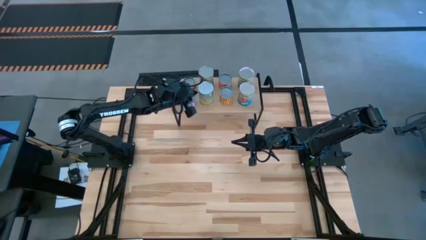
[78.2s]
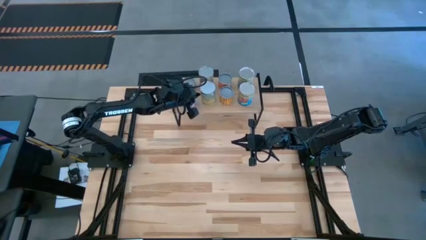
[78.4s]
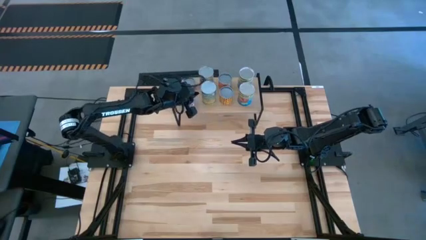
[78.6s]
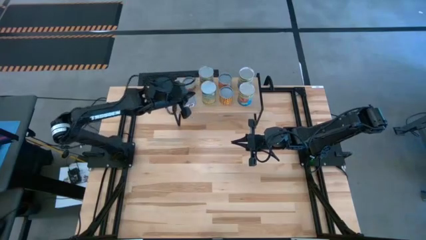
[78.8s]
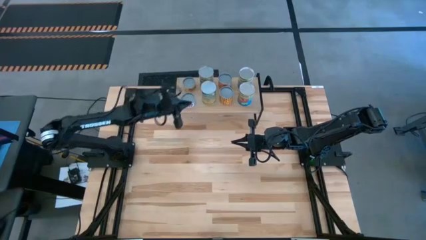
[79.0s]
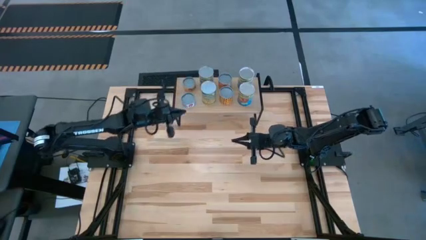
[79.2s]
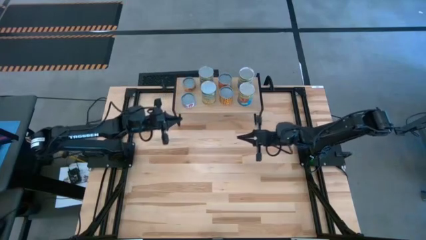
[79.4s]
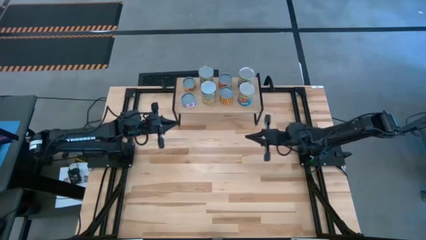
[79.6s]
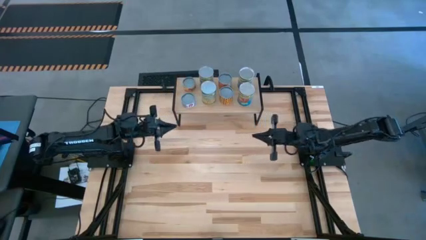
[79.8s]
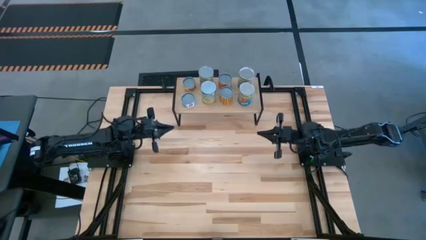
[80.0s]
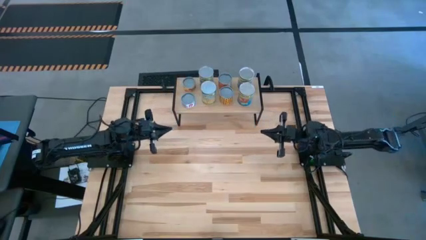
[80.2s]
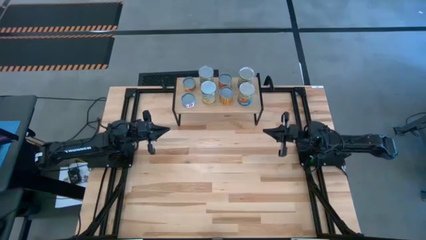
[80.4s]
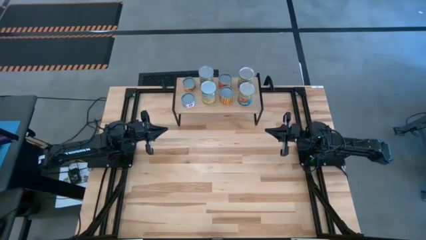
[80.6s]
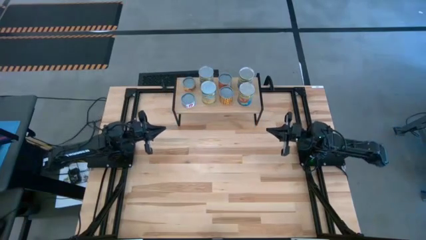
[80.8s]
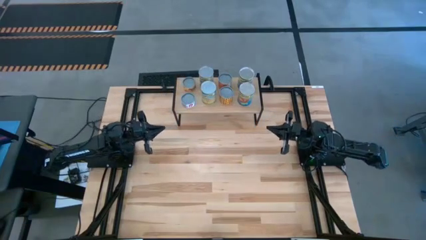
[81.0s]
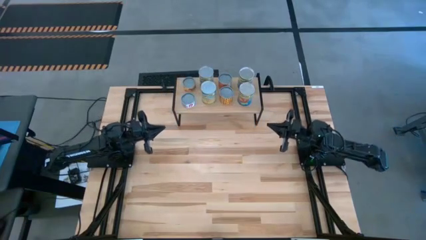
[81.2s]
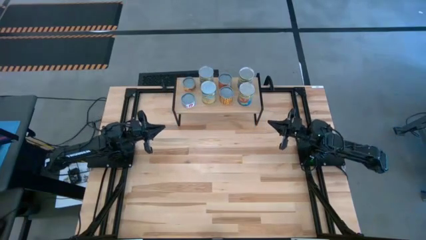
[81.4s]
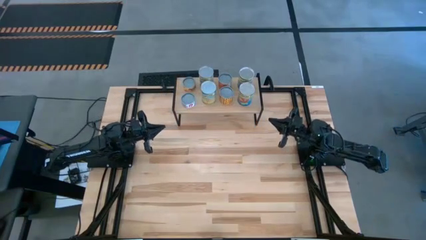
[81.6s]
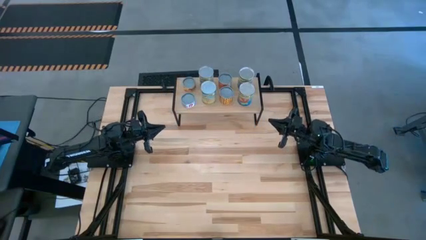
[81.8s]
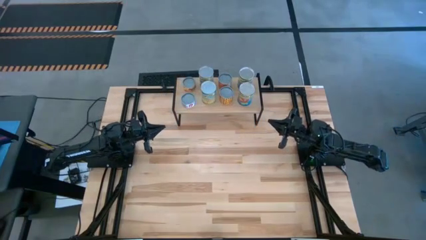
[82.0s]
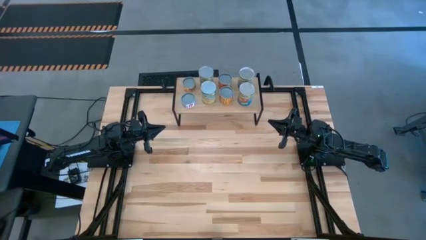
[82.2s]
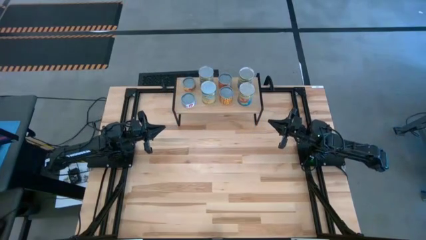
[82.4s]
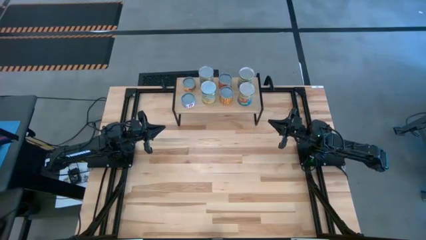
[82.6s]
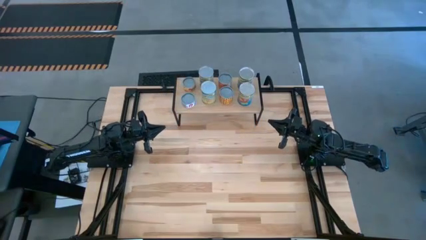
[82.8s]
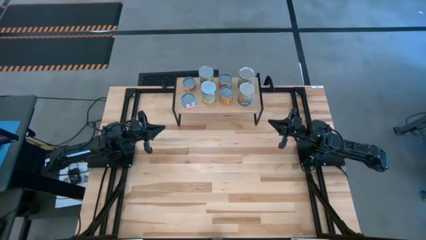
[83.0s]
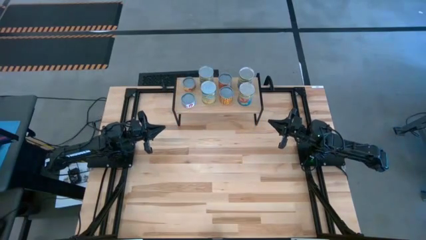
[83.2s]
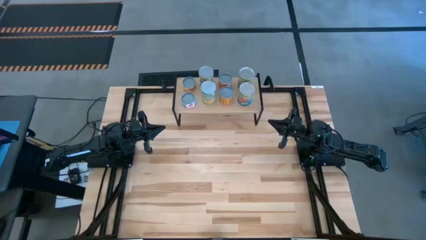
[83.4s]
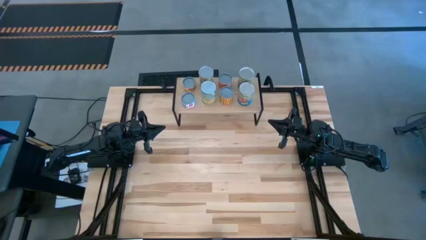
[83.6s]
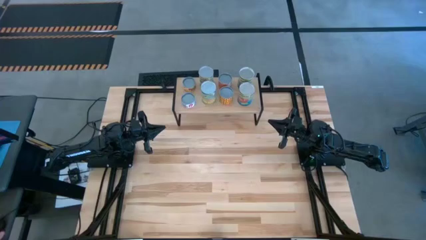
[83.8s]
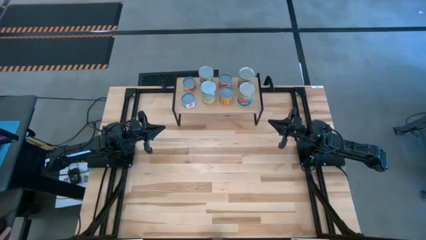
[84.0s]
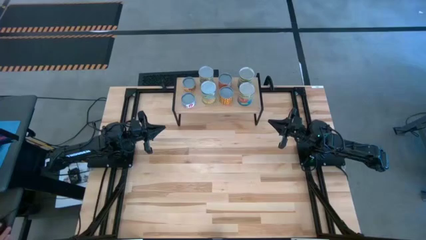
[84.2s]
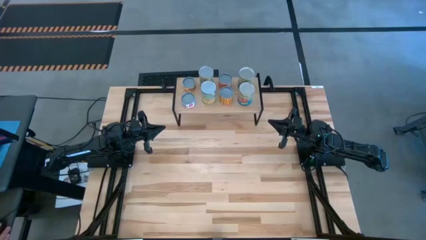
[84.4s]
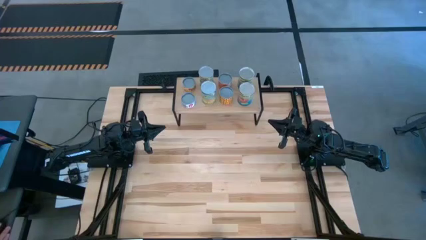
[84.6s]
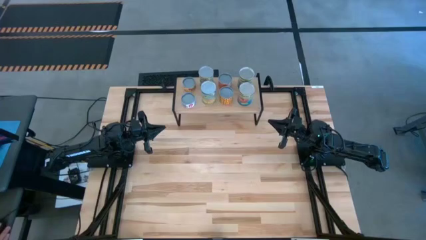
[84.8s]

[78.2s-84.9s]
Task: Pick and place cans onto a shelf
Return to Home Position
